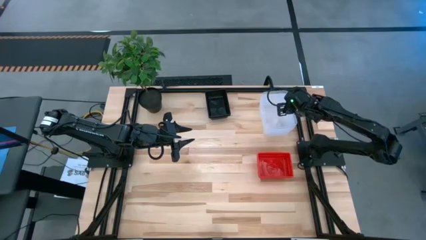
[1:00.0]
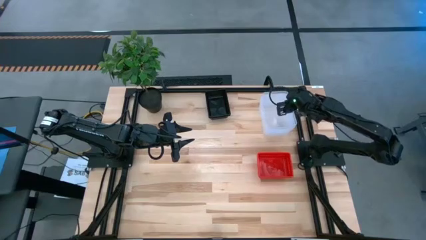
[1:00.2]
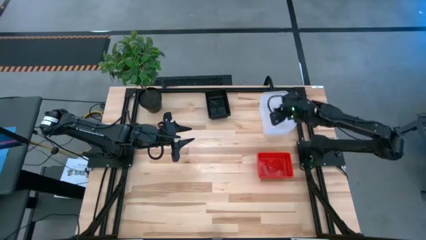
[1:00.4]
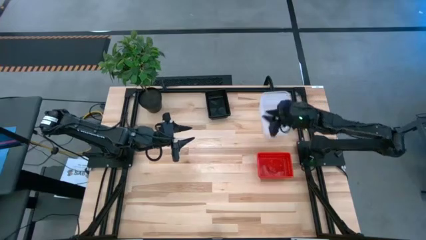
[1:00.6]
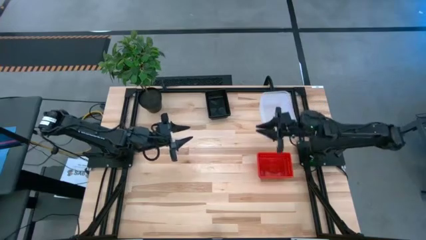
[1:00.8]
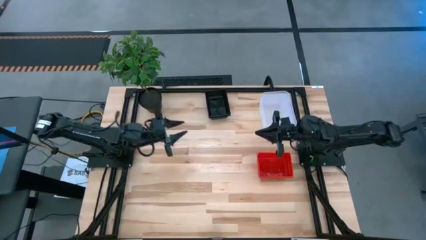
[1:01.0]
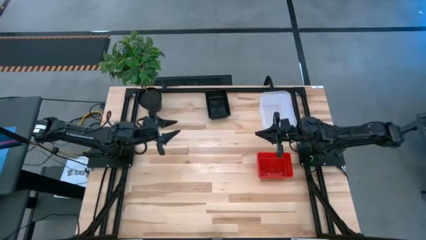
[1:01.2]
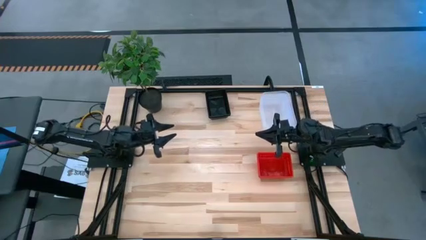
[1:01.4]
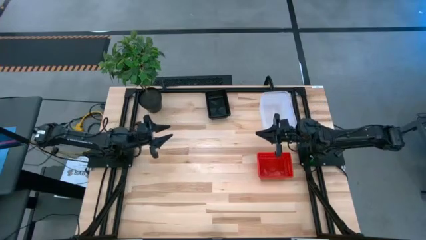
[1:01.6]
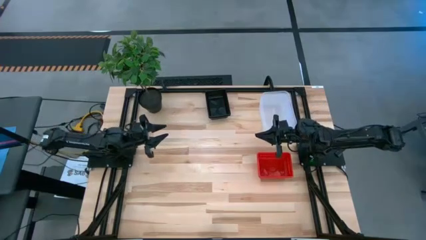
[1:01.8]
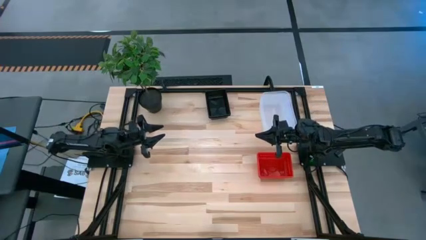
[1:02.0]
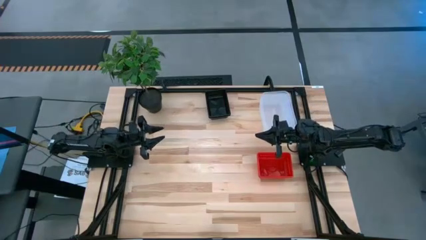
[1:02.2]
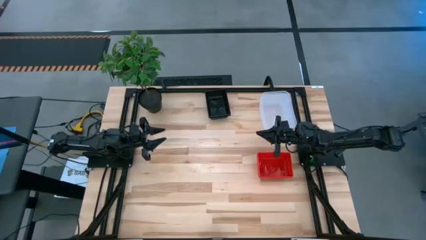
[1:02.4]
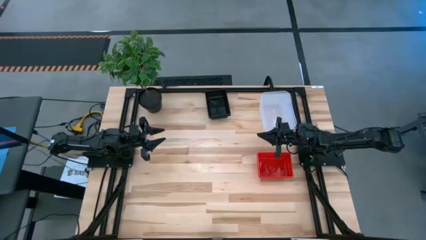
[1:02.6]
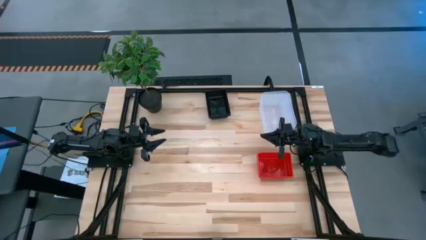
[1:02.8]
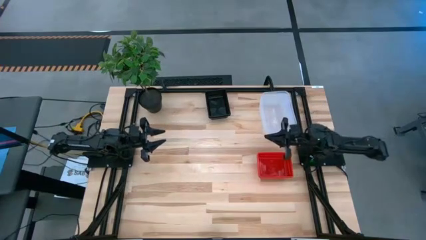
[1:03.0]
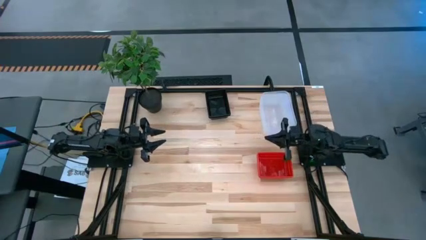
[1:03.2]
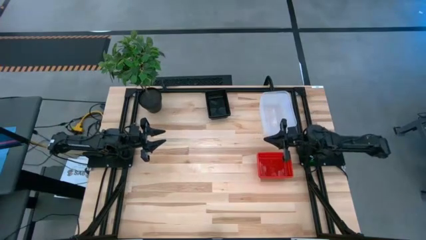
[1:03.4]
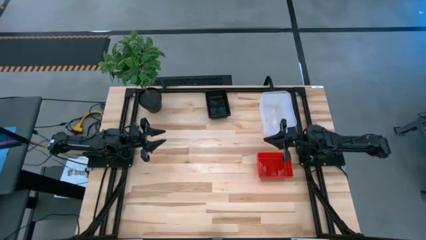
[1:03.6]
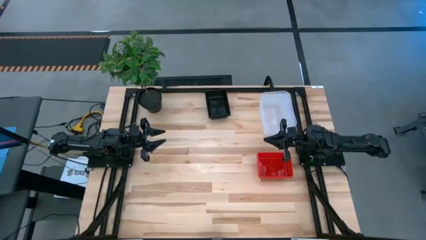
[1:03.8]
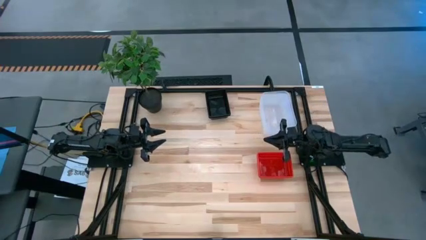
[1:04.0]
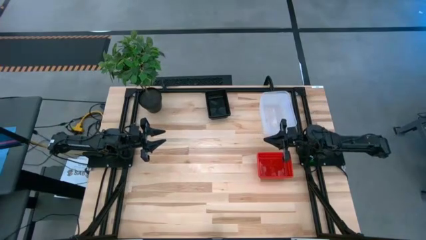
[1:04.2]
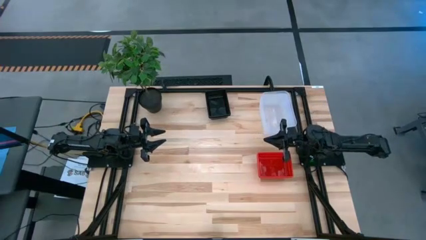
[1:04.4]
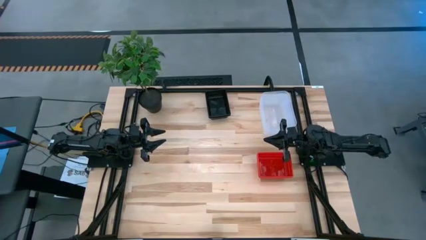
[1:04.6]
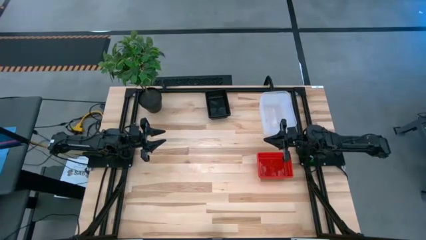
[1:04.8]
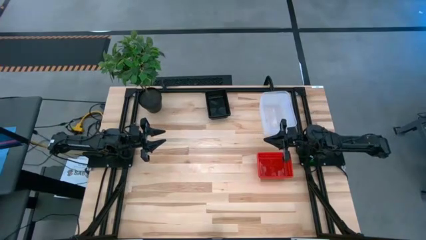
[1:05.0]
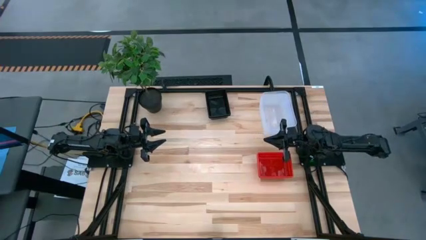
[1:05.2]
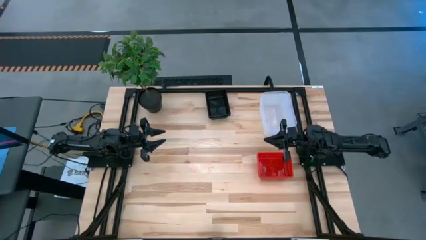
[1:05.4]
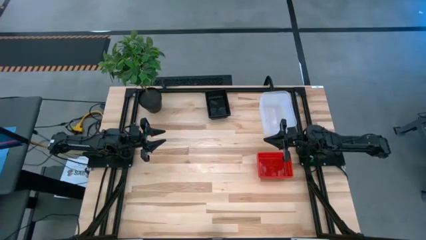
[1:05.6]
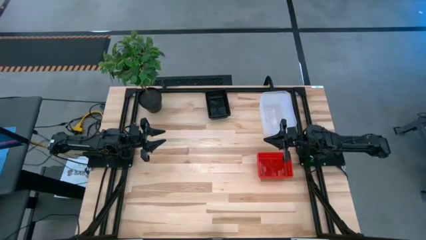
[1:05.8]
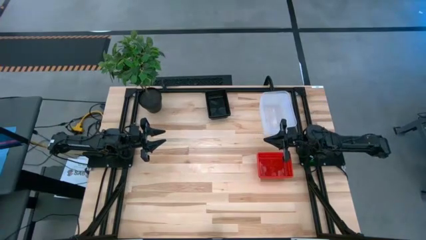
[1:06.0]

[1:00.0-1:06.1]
Return to Home Position

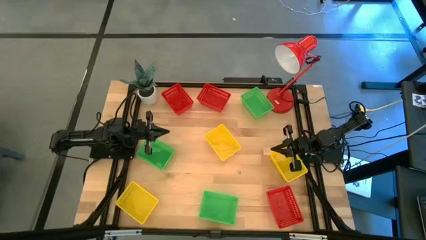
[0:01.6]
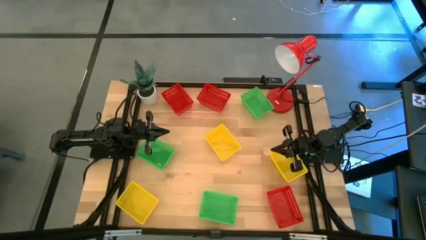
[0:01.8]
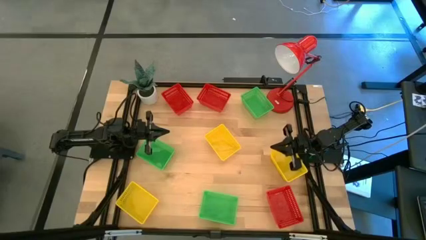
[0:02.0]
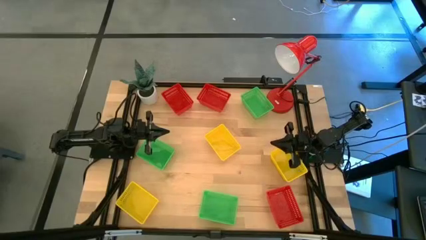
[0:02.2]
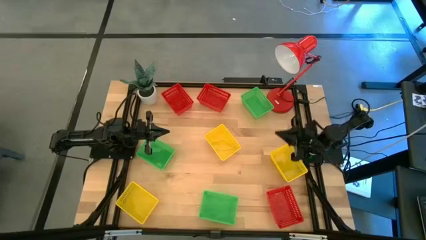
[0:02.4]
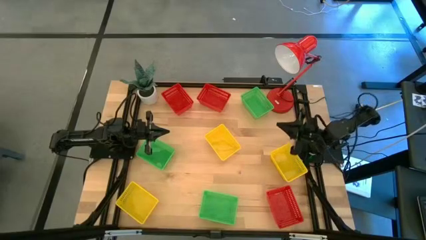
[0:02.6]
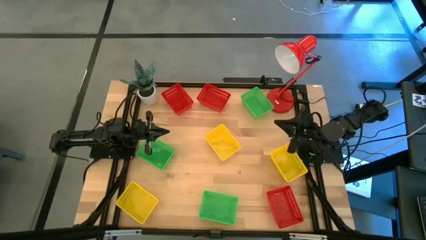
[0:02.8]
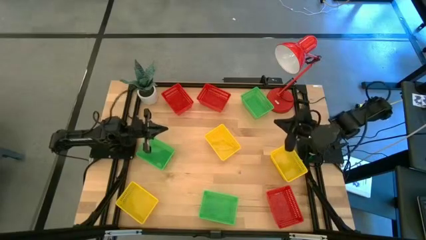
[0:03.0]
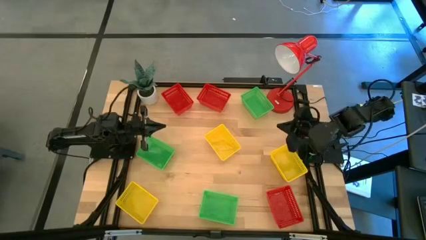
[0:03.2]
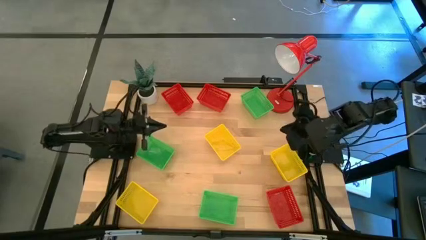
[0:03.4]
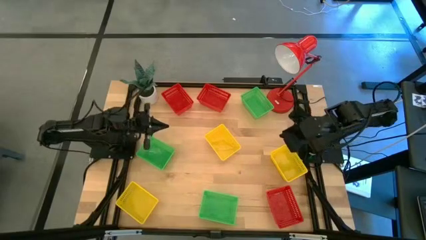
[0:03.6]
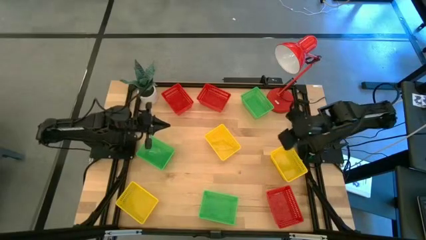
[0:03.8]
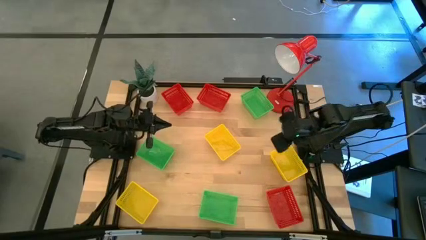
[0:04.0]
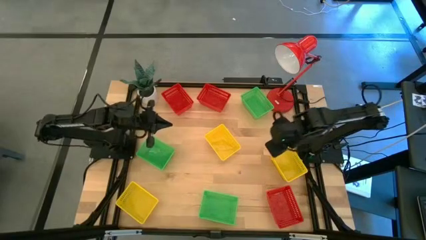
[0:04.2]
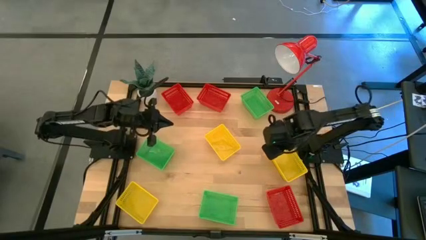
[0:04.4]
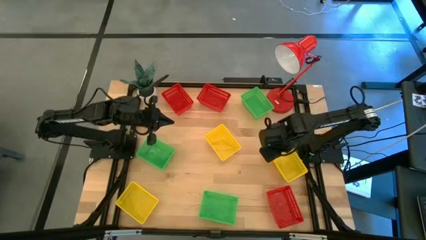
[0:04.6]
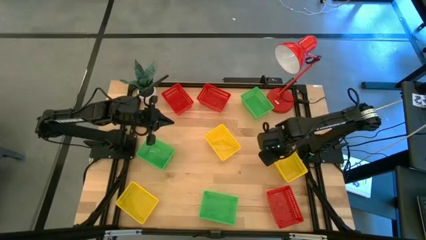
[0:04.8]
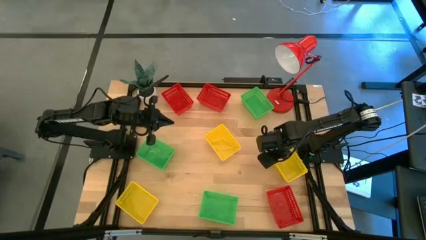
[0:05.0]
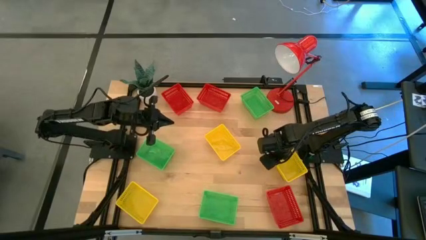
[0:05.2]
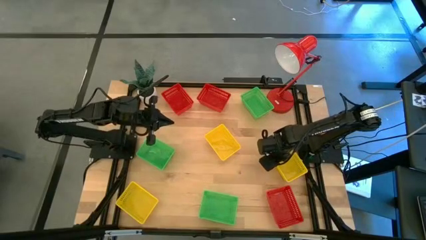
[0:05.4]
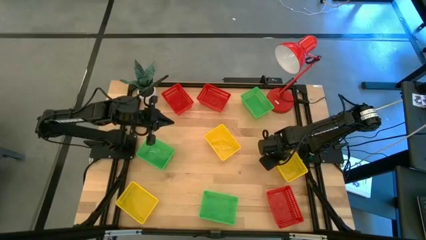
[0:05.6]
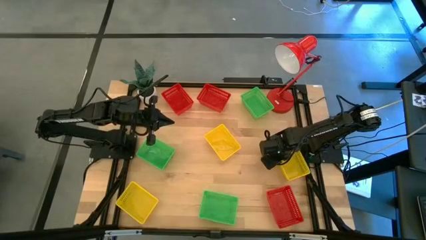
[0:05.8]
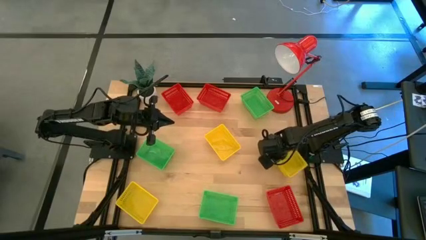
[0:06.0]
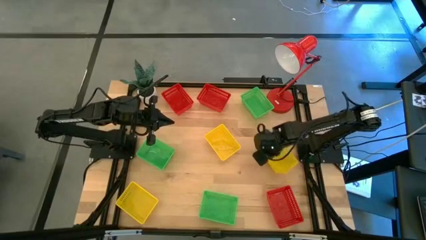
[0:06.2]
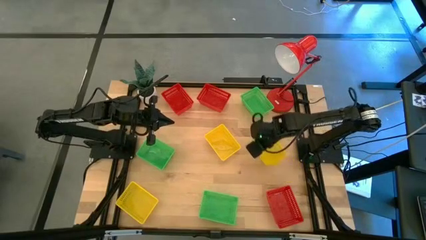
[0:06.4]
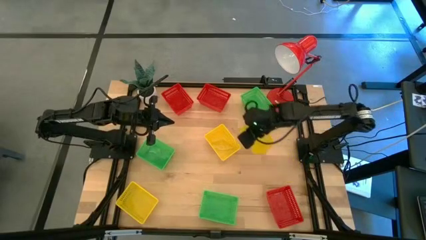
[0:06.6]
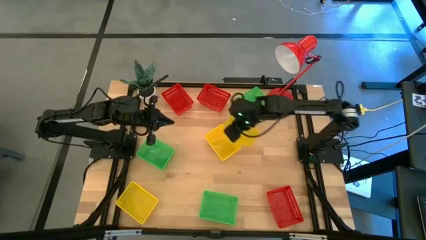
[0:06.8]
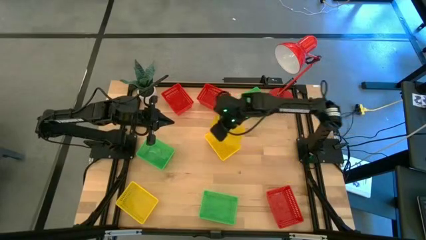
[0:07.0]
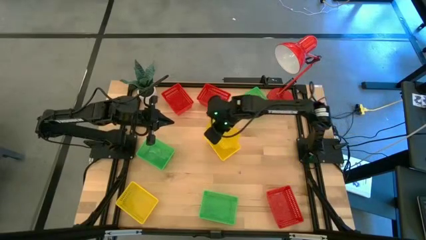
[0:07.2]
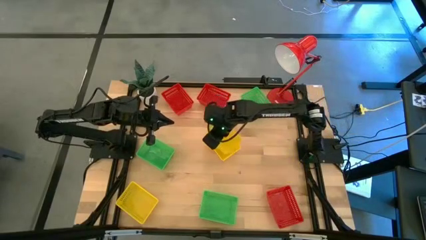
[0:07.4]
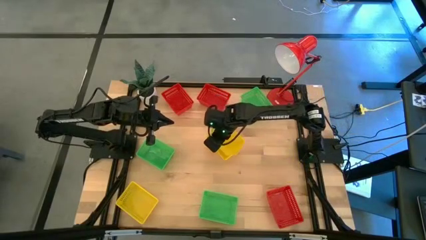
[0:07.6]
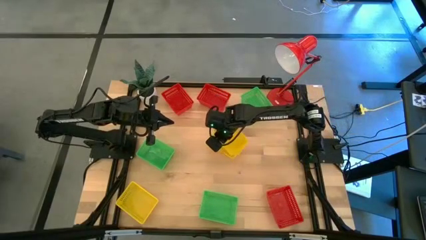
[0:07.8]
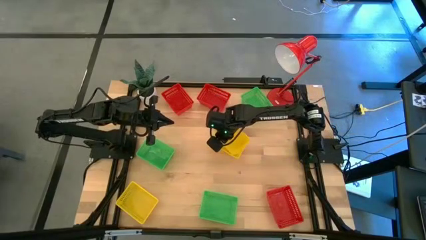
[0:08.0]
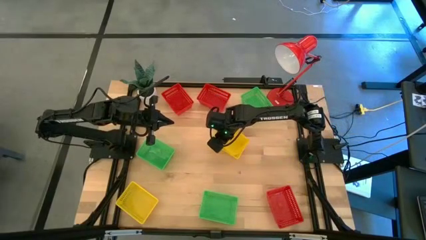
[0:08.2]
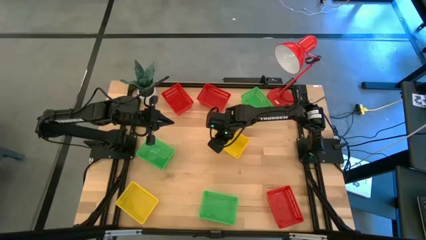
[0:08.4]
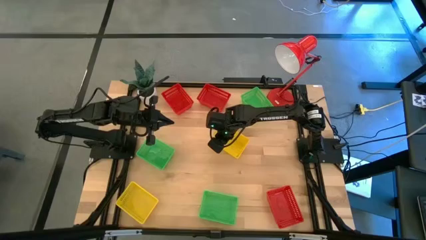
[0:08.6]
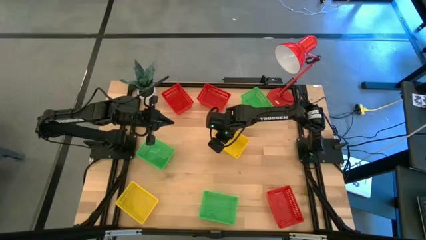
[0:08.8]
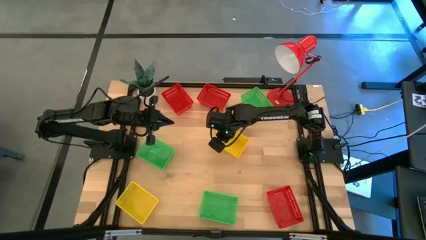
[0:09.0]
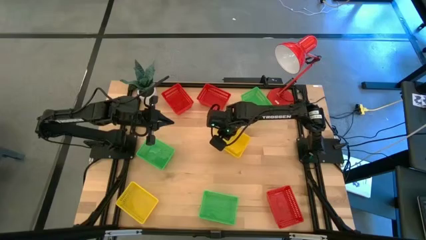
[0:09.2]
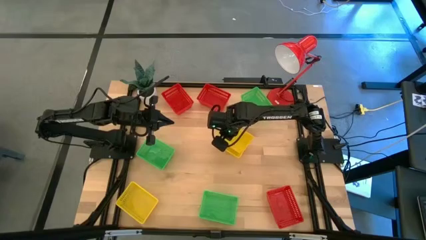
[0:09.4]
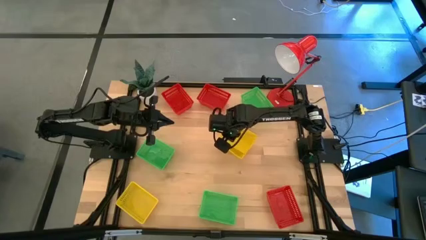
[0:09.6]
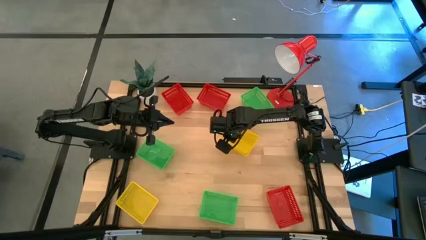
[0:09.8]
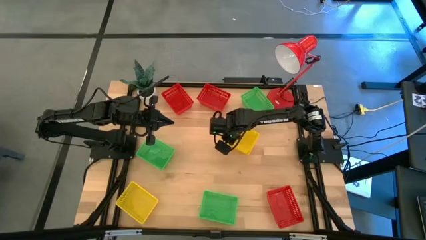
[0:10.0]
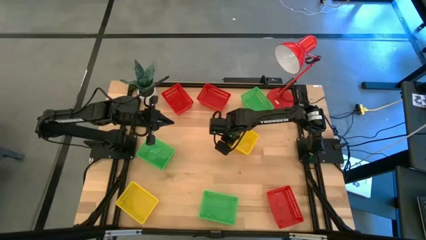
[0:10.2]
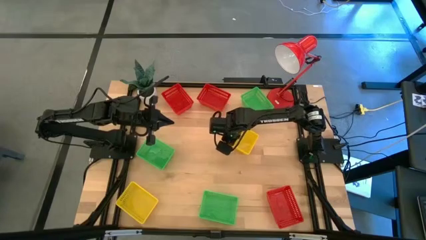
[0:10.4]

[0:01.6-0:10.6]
Stack the right yellow bin on the yellow bin
